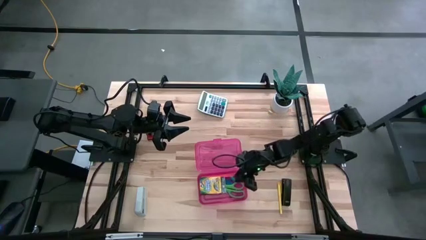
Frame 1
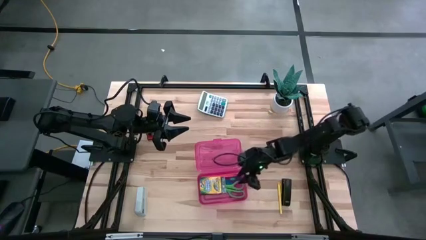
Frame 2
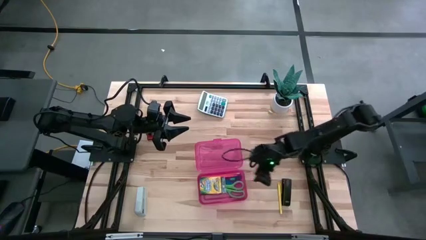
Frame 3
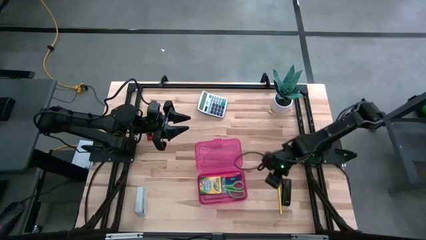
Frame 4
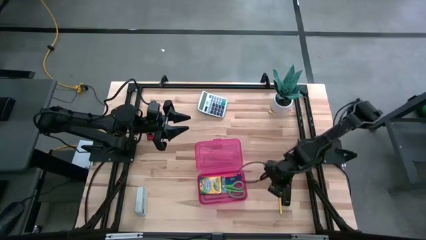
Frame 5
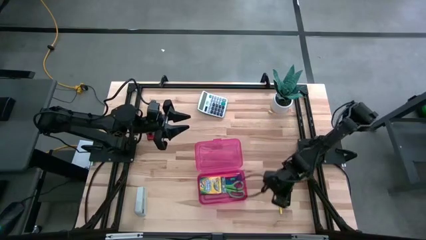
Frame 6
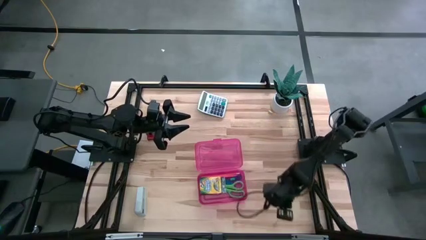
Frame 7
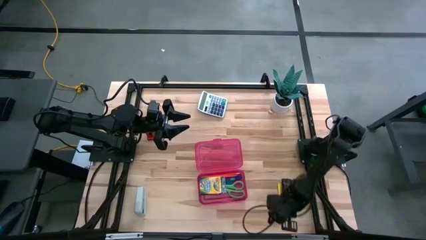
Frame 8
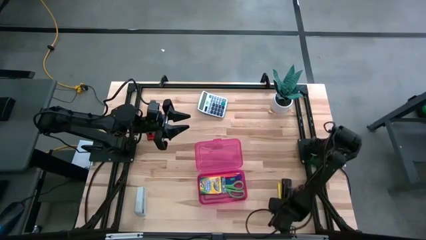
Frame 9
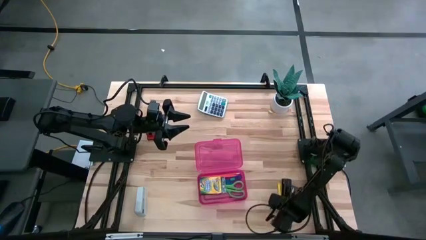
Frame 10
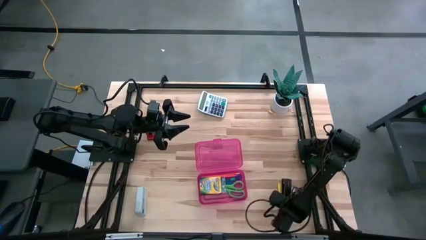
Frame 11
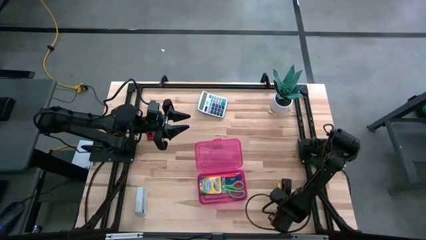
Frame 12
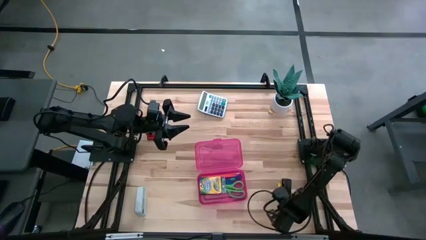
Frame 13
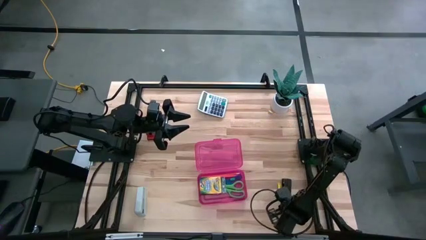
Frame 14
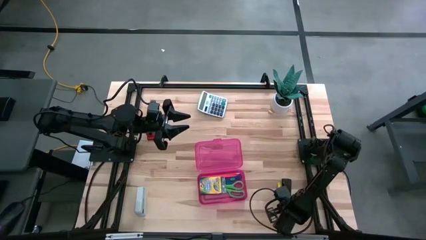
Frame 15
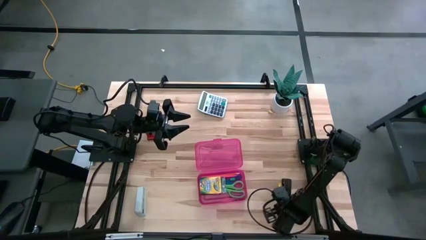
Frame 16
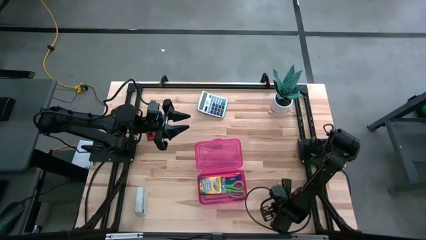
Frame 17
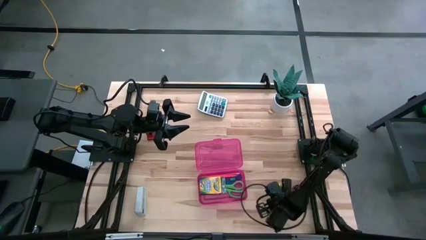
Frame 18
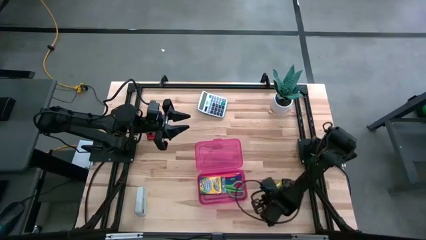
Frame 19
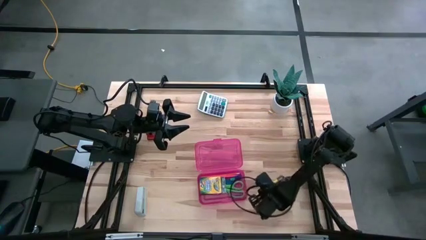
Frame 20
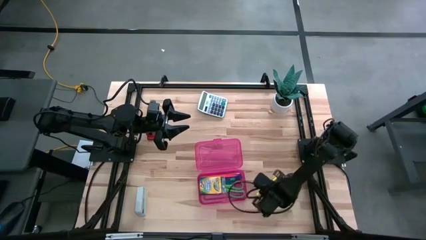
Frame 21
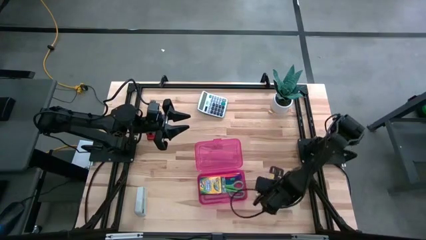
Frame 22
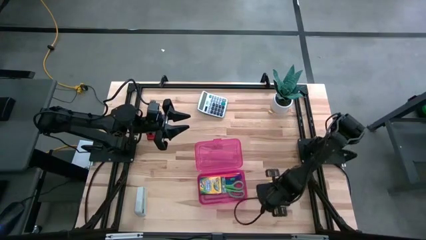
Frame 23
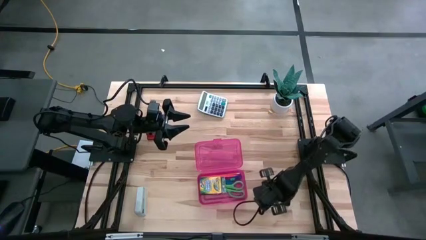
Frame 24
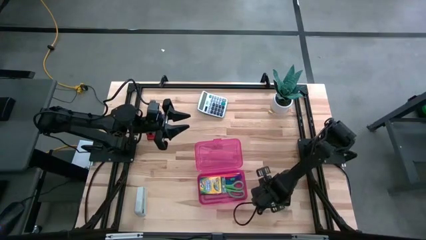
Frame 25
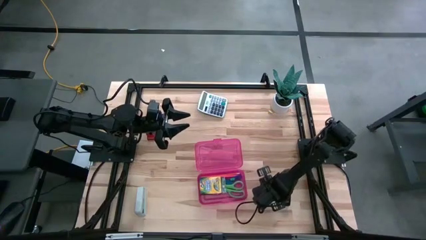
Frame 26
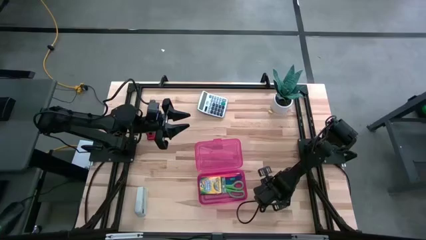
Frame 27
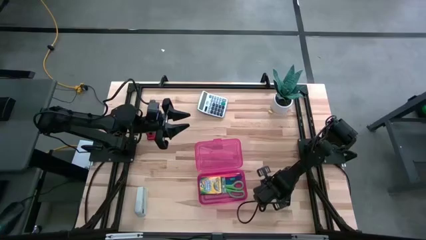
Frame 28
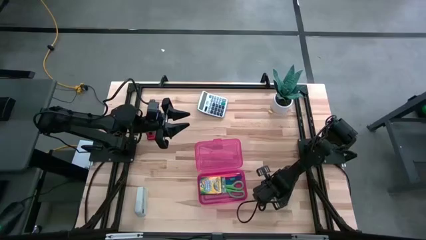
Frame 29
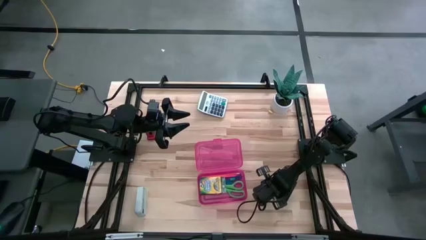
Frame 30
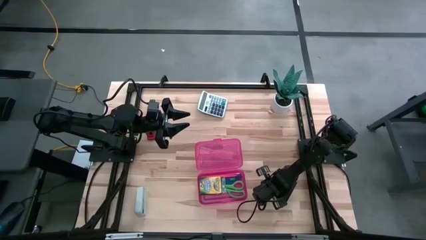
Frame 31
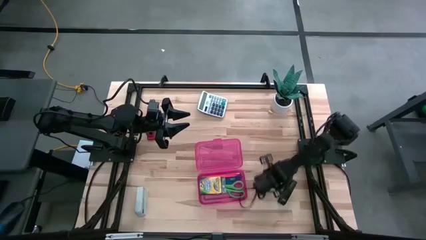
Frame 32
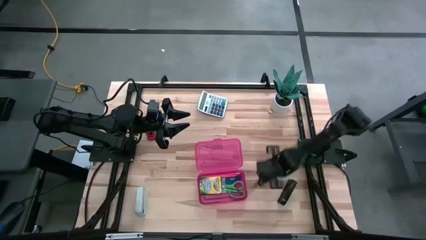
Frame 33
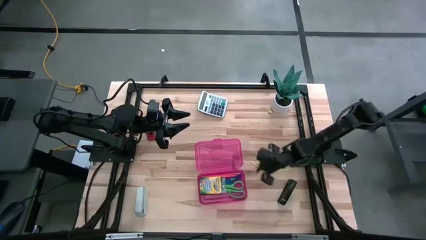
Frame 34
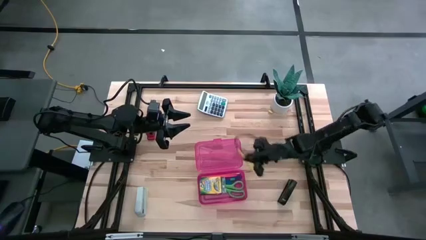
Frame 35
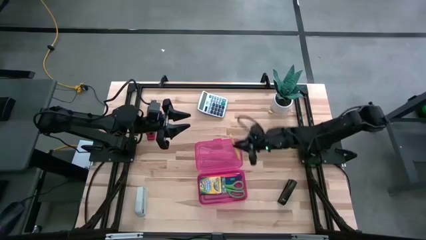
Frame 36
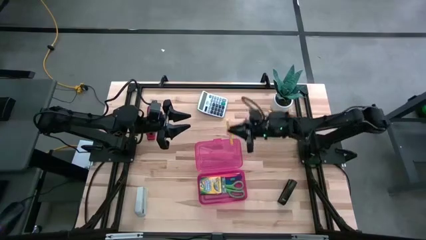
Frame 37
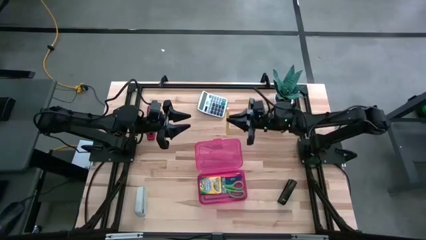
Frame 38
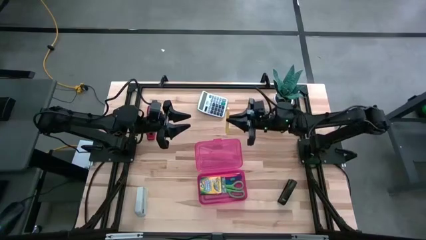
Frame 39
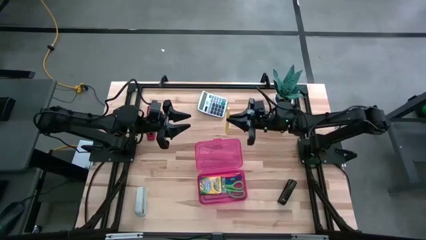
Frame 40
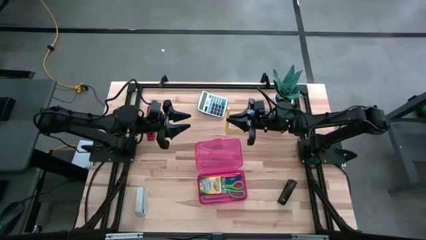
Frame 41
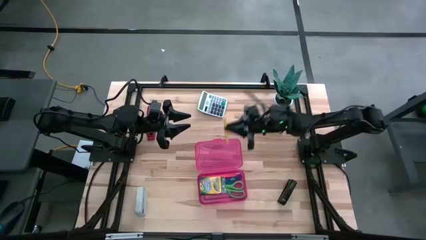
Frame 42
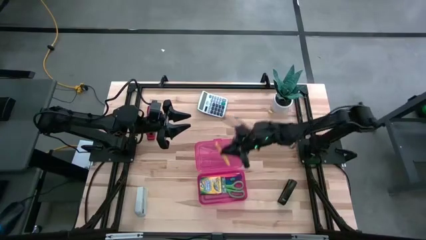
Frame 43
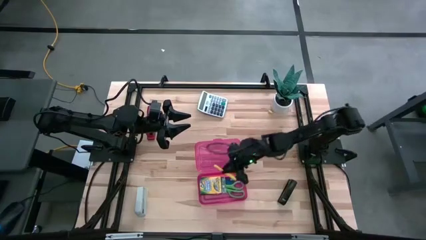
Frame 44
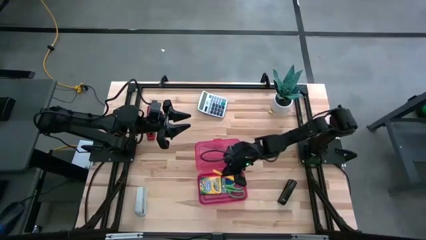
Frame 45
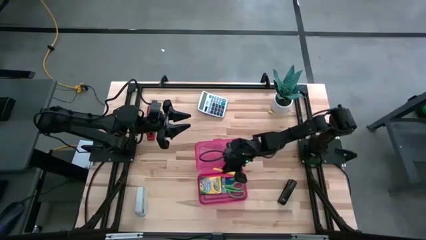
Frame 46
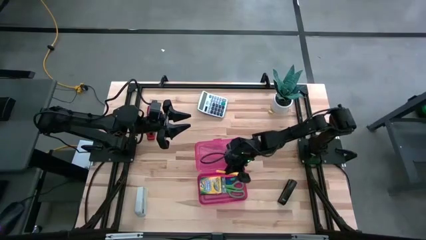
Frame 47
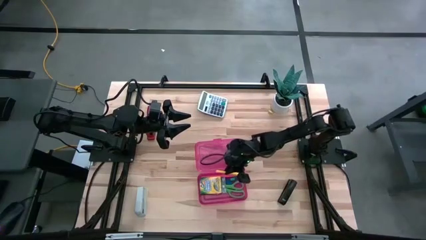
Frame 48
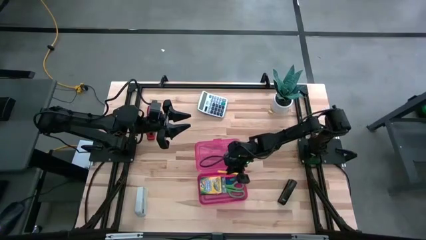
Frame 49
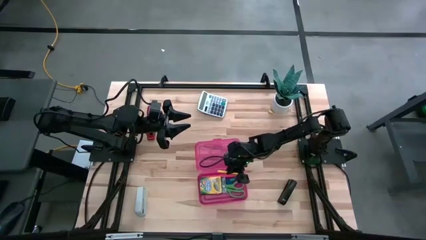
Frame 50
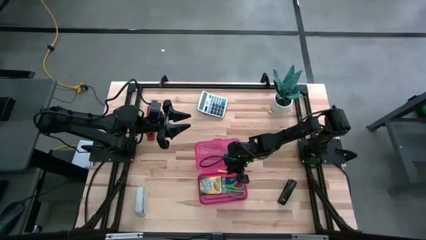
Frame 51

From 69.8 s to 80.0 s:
Task: Pack school essentials
Put the yellow pen into the pink supply box

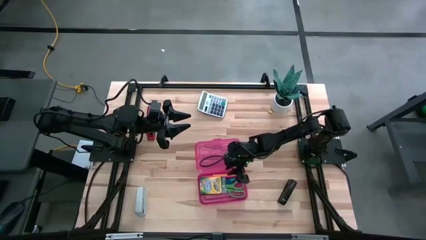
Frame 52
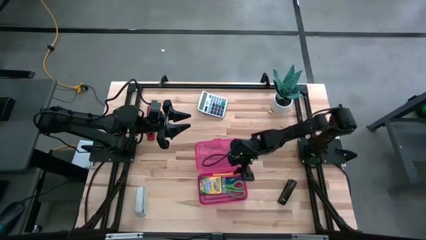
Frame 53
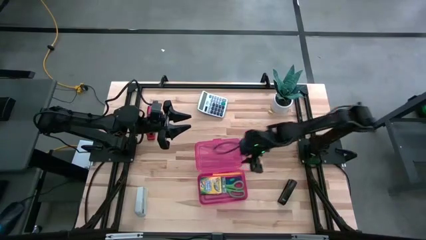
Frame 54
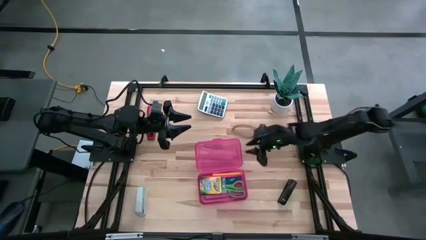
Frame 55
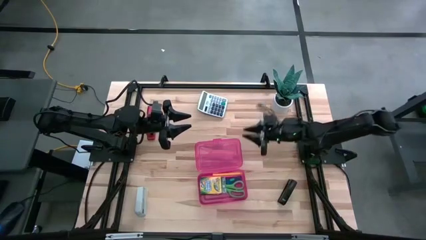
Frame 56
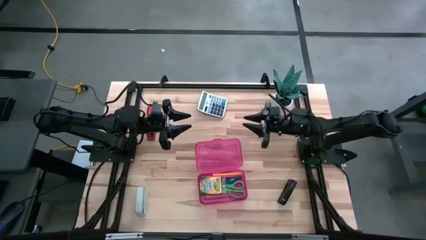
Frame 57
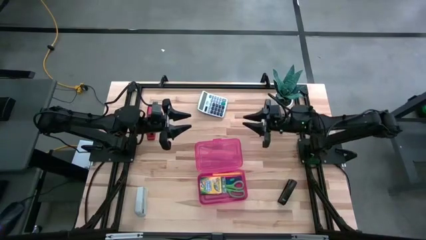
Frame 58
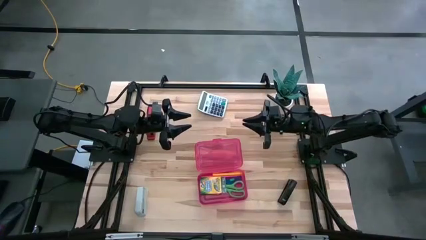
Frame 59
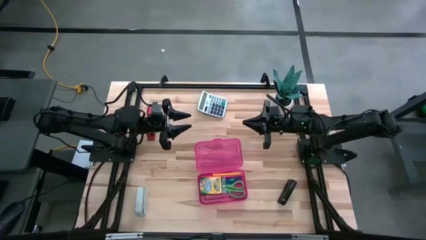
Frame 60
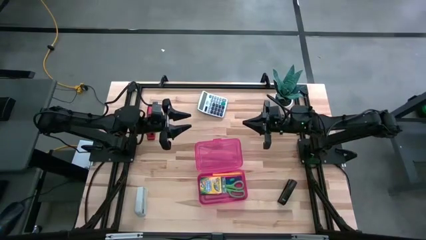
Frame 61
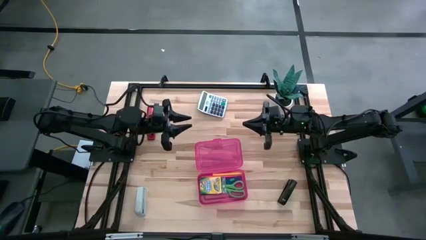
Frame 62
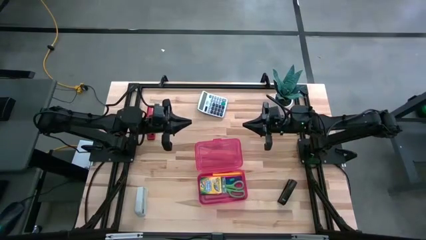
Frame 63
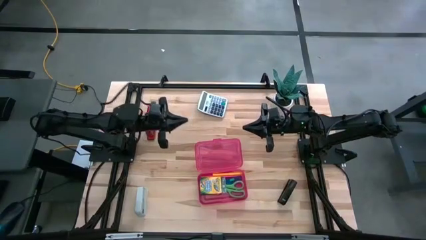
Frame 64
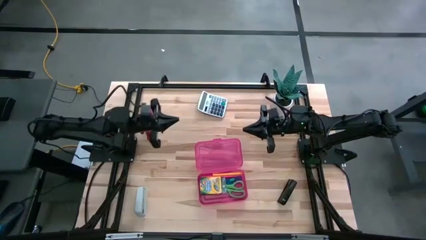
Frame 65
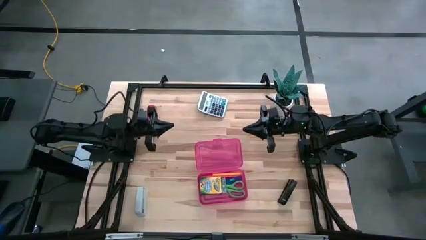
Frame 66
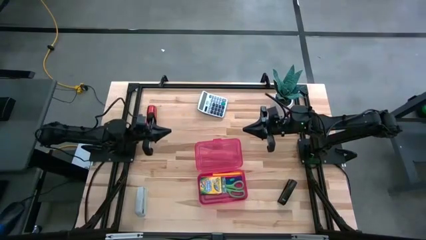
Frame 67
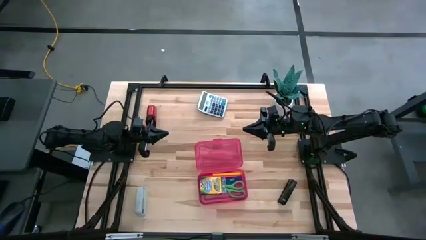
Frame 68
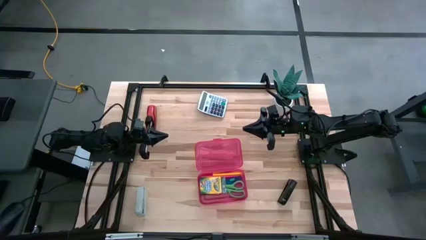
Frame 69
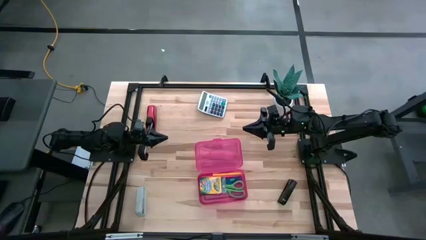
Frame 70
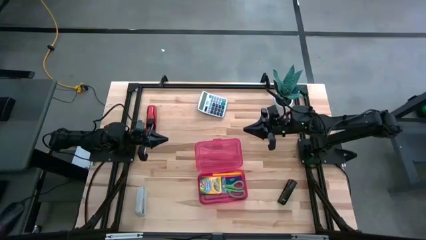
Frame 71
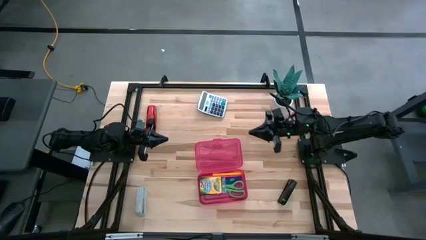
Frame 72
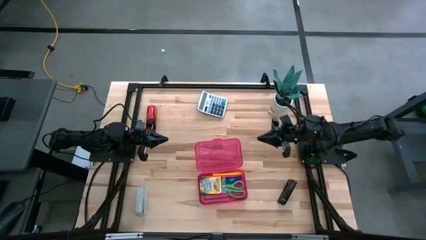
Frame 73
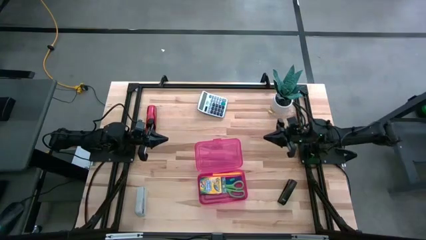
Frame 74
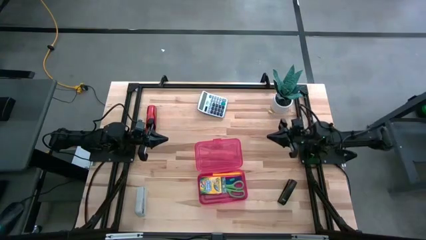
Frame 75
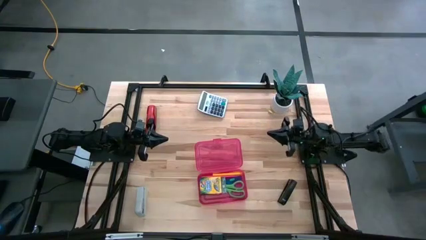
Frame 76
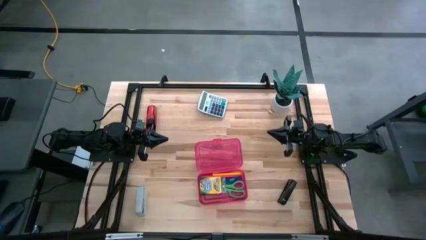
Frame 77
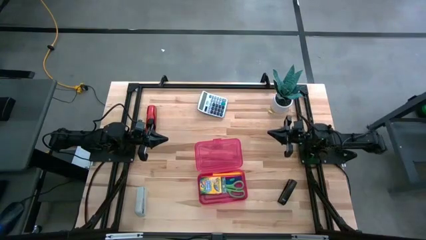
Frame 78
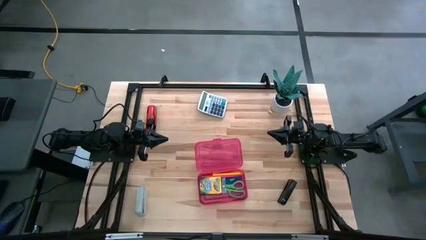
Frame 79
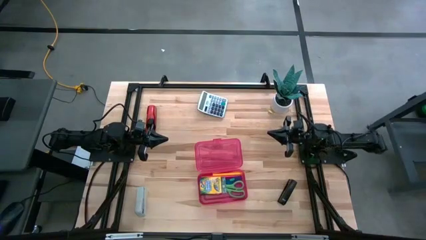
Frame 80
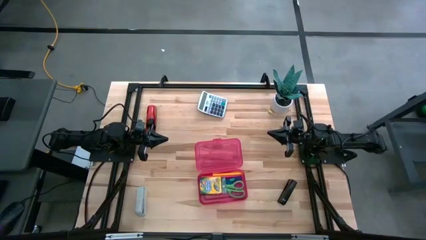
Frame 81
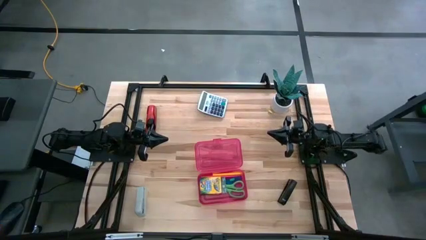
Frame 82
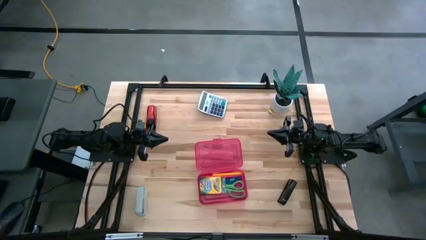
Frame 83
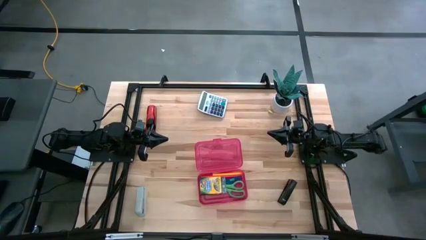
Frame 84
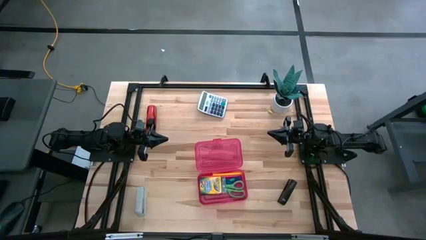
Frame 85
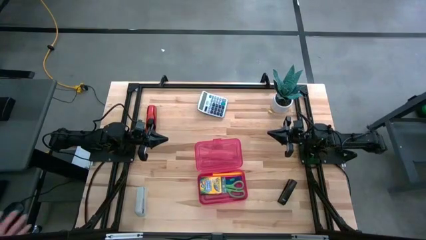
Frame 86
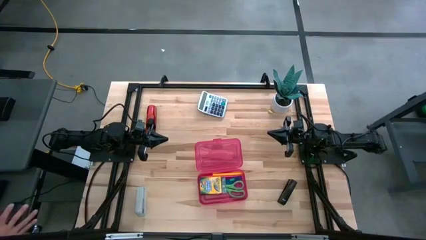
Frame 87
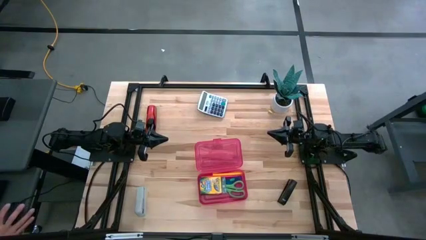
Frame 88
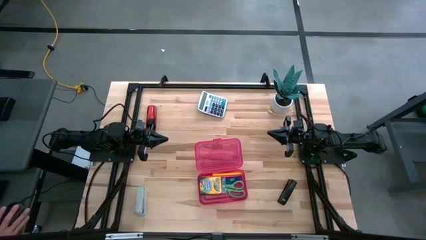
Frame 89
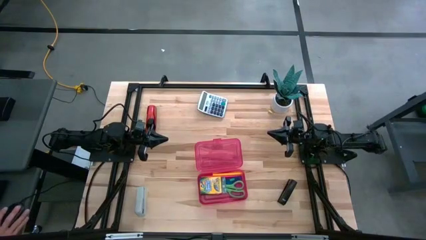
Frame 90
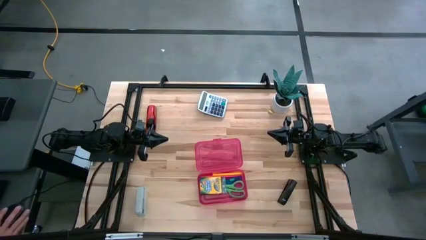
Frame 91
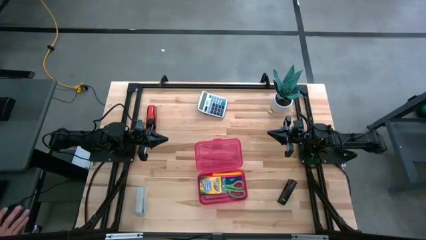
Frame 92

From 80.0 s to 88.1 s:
Return to Home Position
